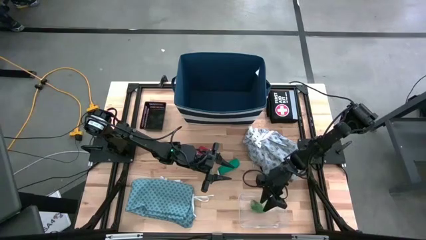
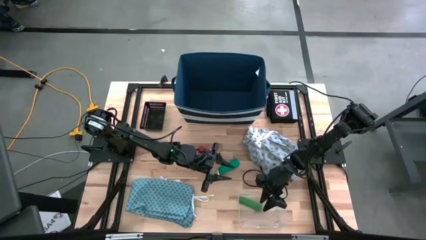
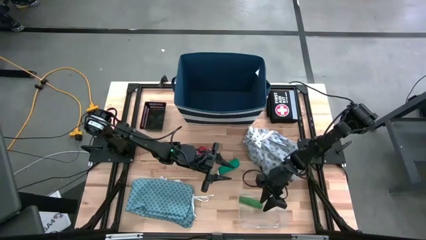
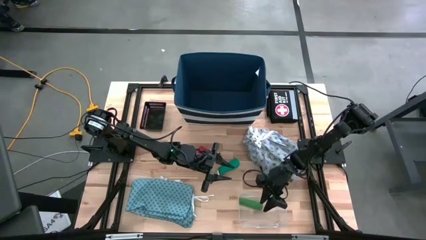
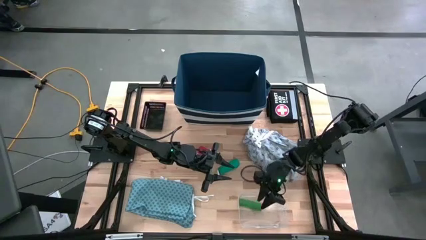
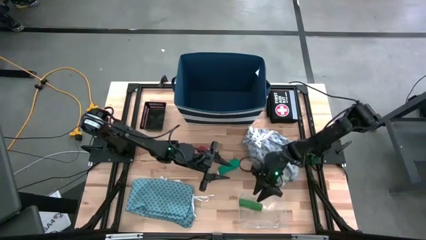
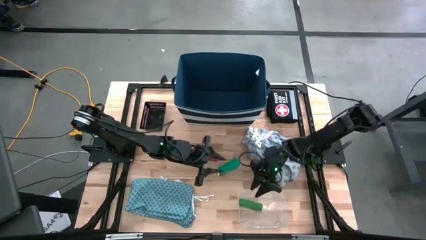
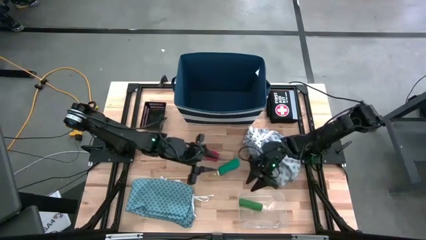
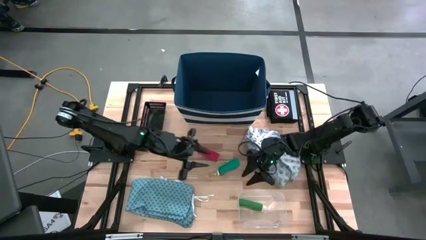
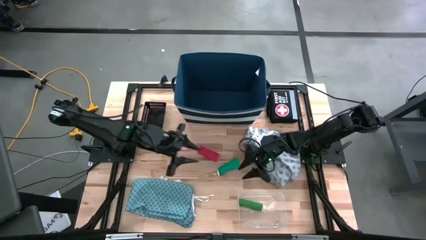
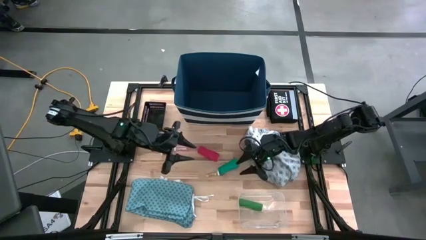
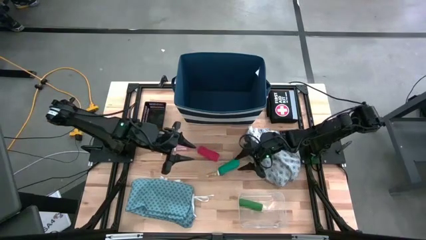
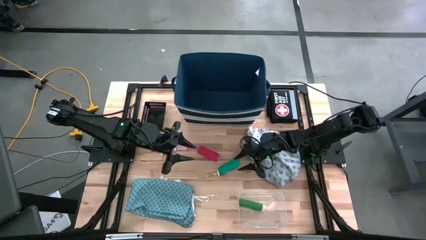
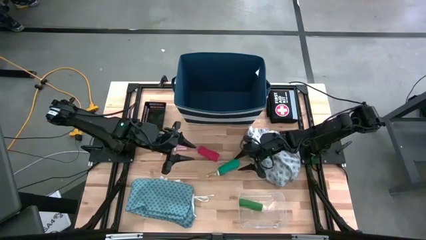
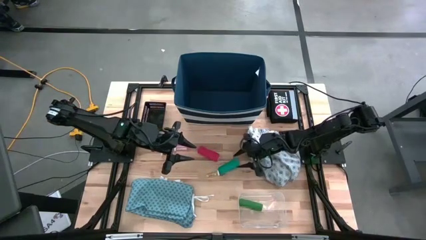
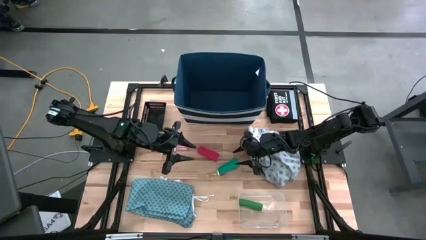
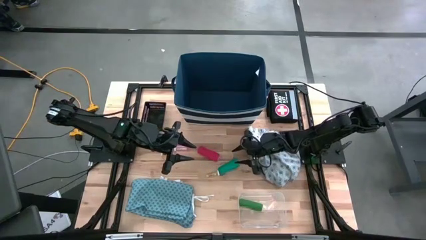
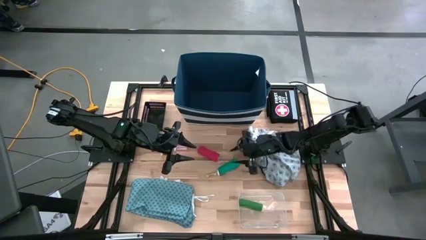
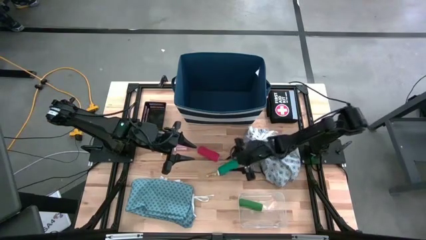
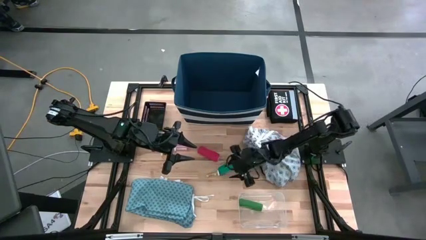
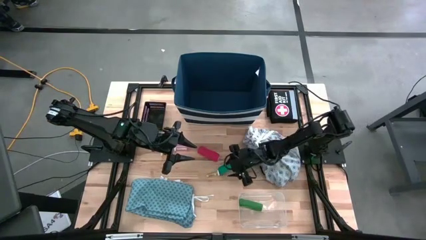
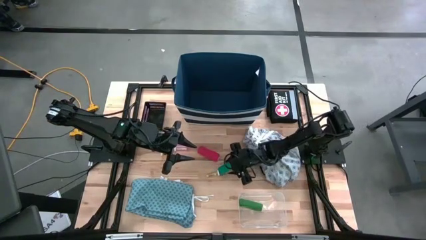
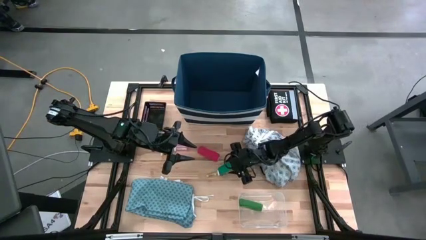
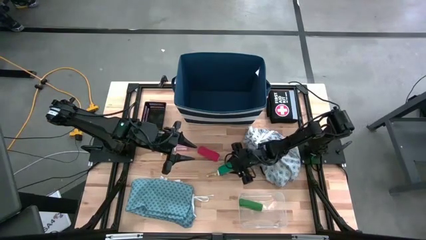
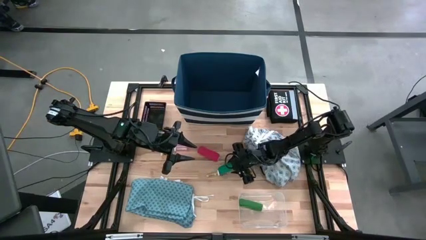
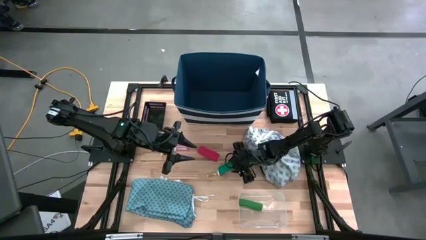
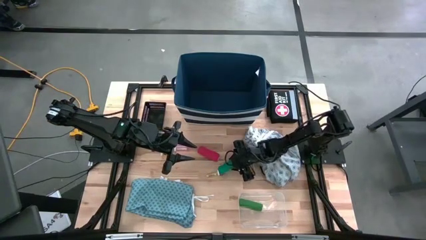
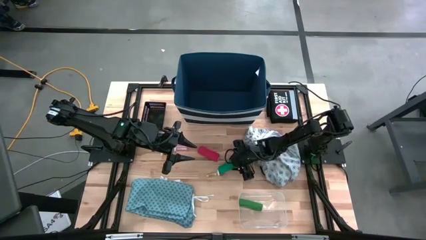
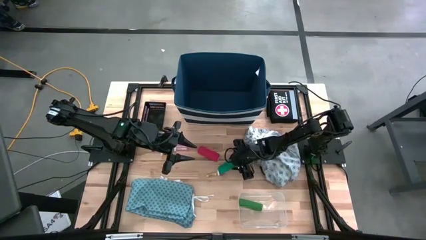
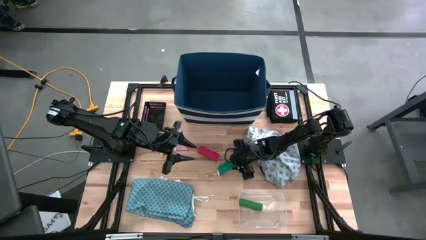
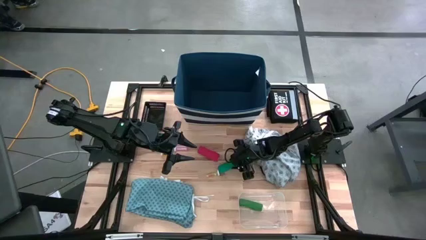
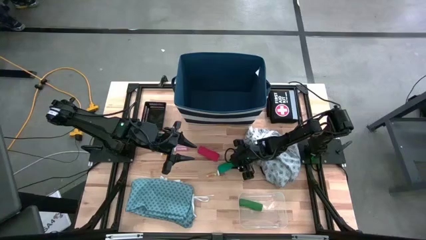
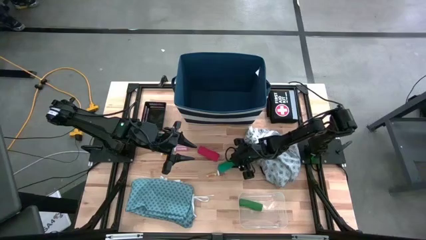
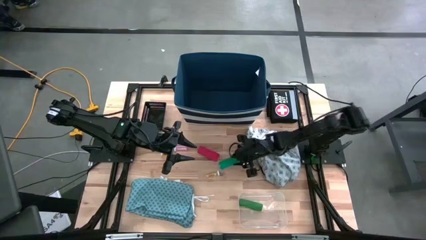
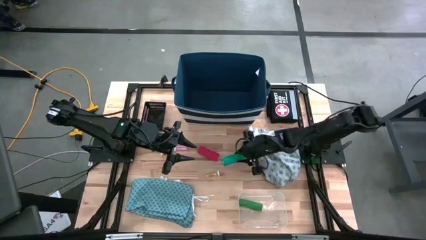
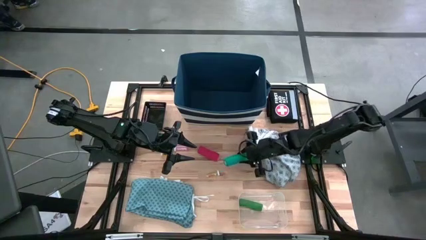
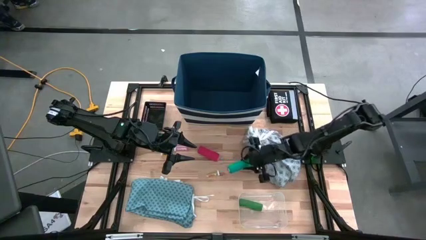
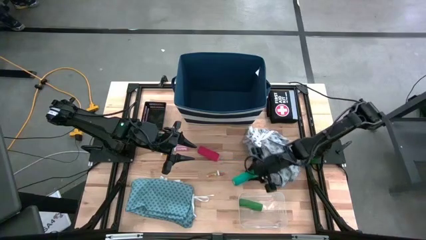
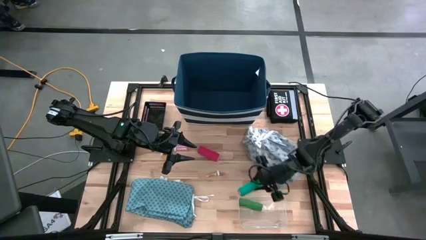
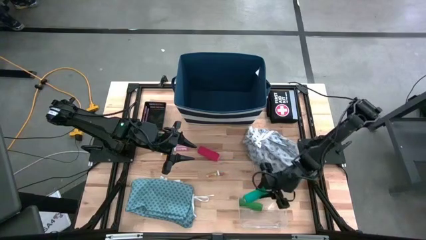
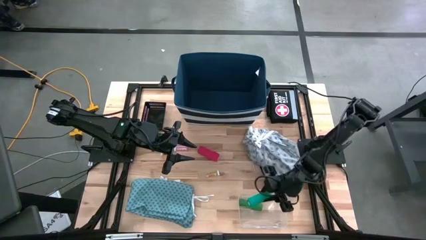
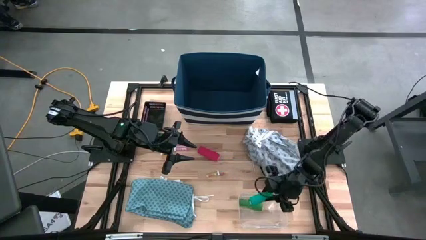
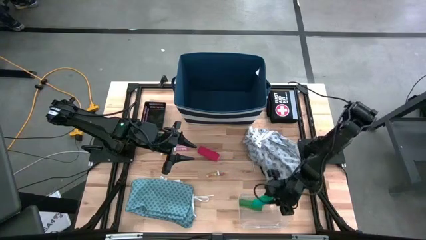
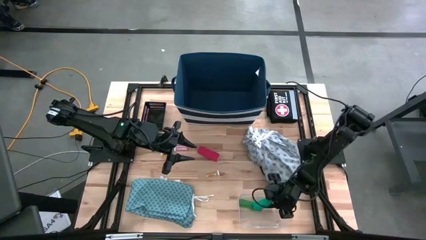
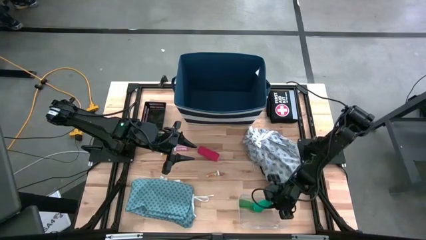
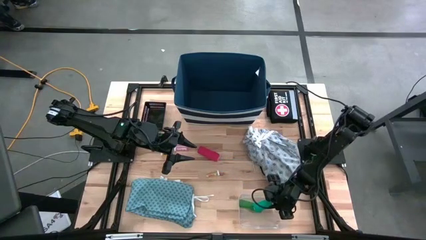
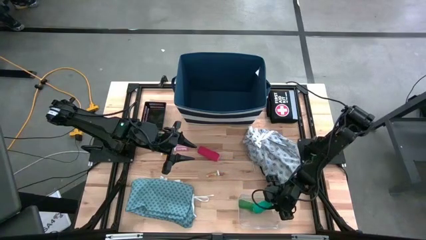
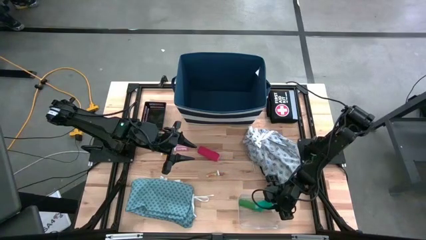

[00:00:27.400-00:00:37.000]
Task: Pick & Place Medicine items
Put the light blue bandage into the transparent bin

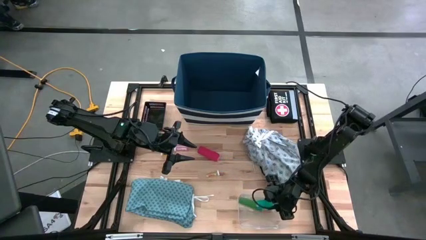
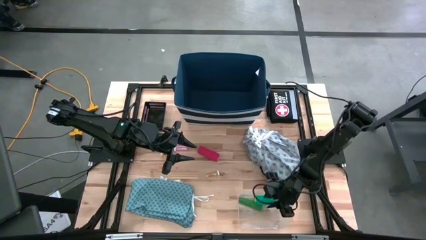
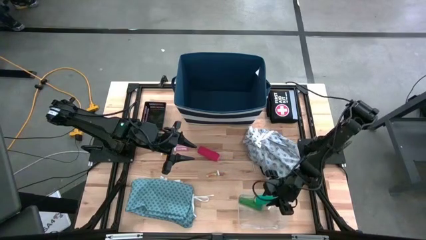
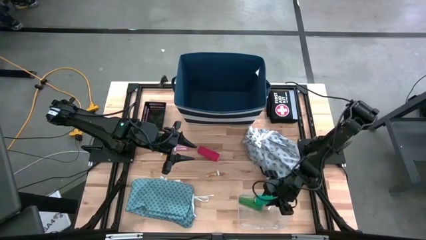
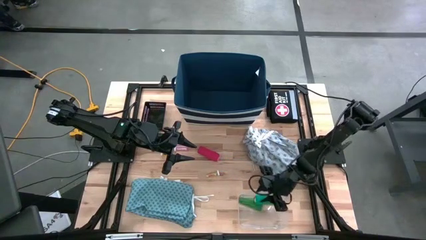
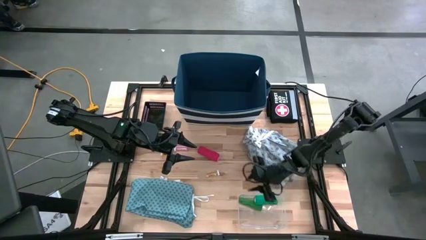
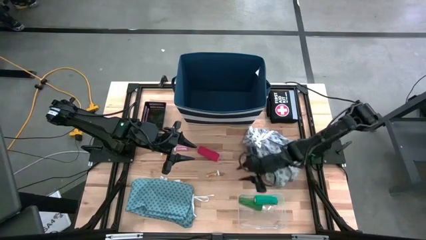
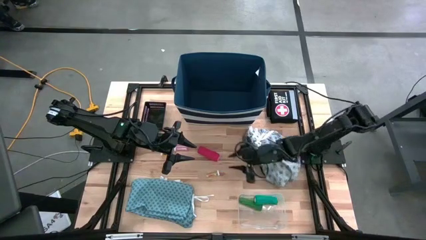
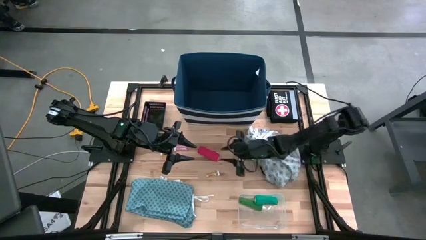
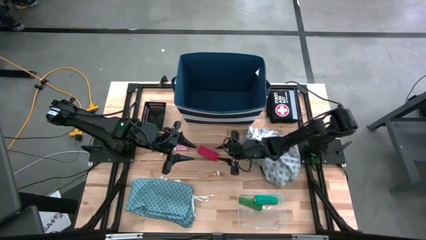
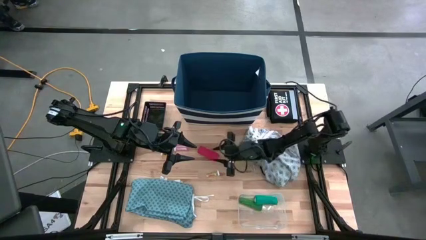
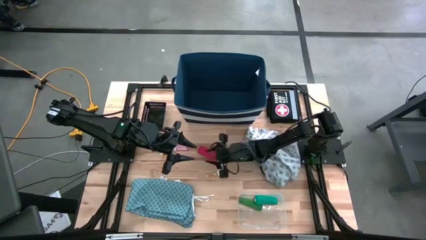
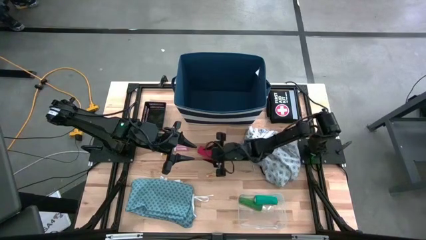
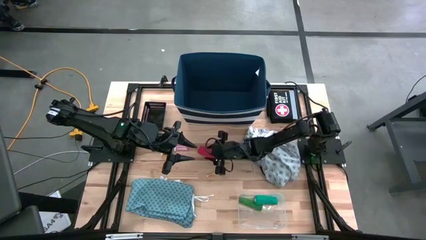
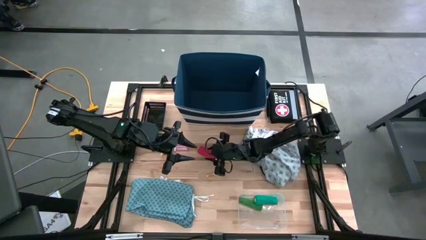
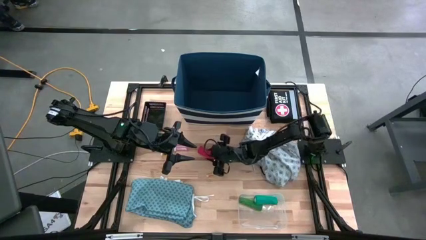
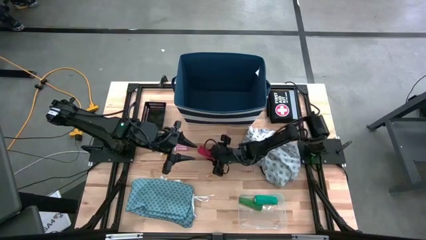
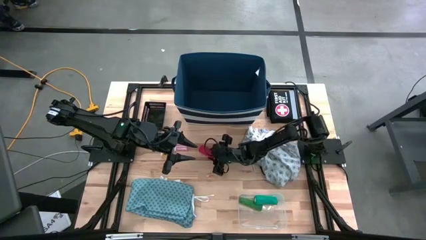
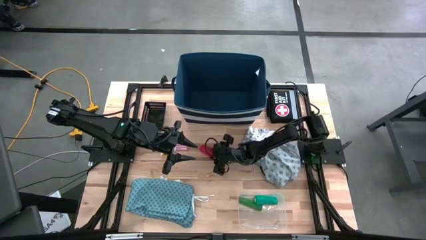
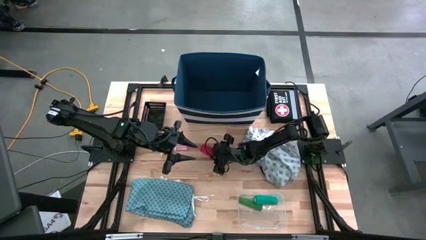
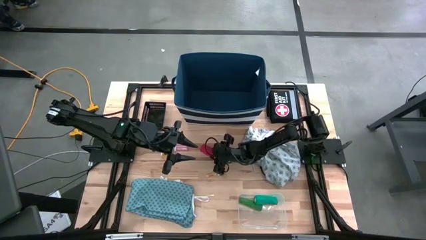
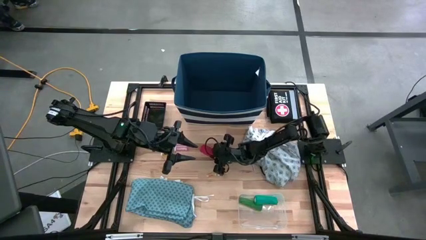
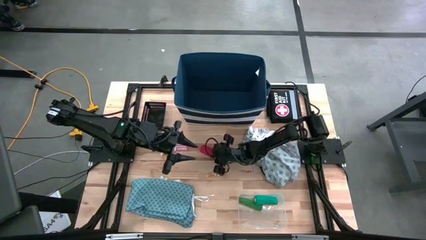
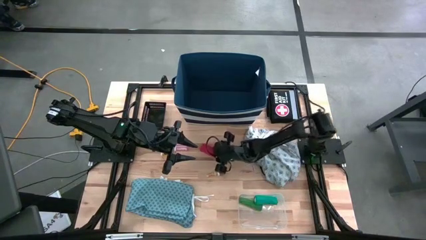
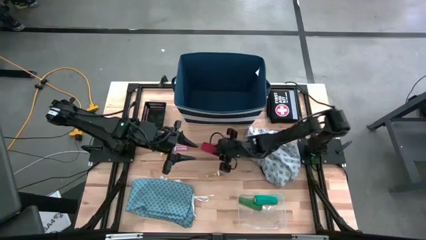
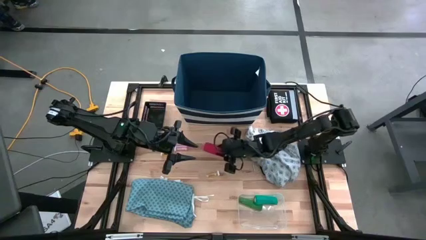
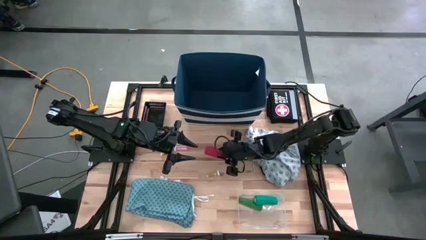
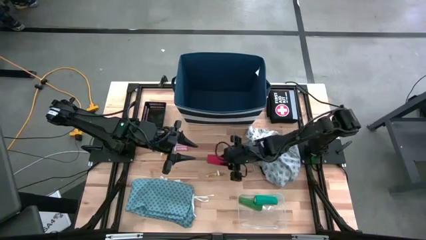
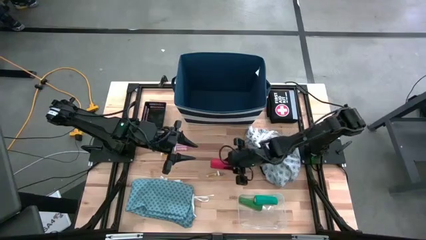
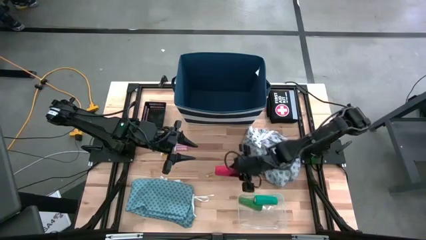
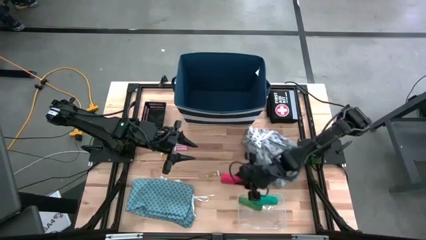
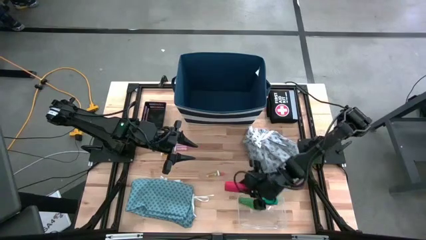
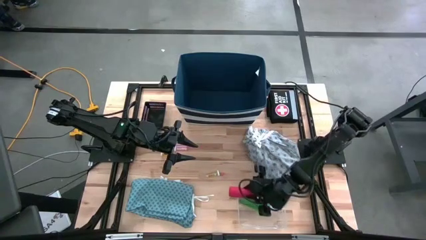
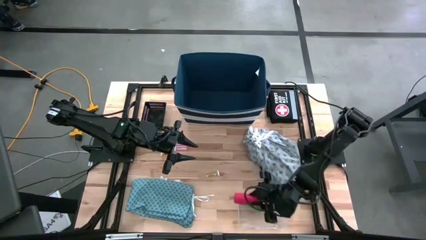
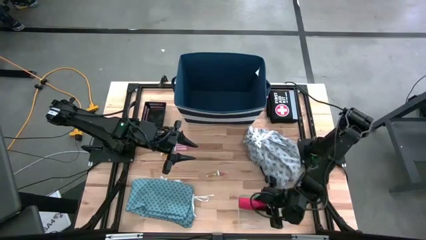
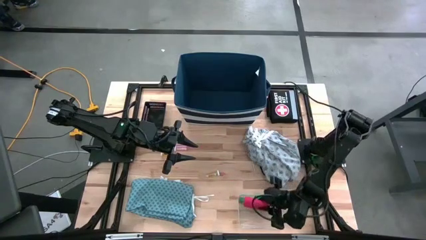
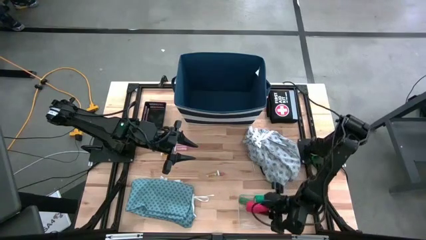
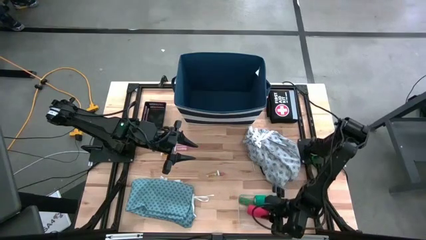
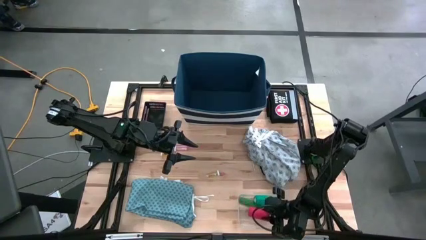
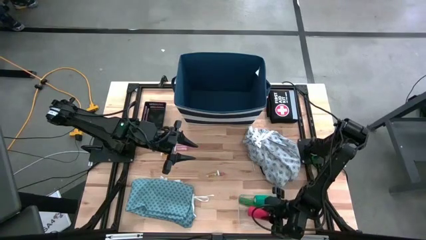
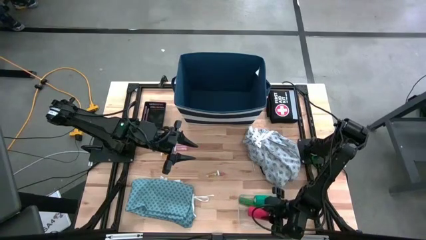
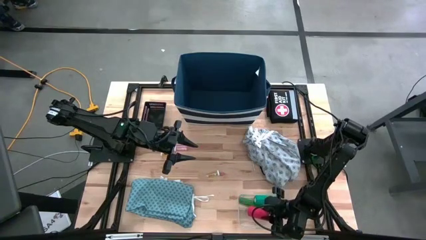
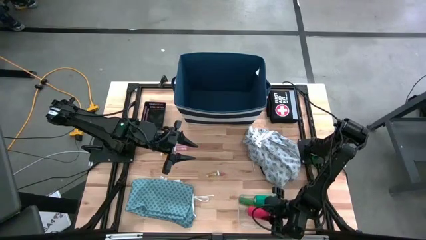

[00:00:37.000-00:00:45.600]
Put the orange bandage into the transparent bin
